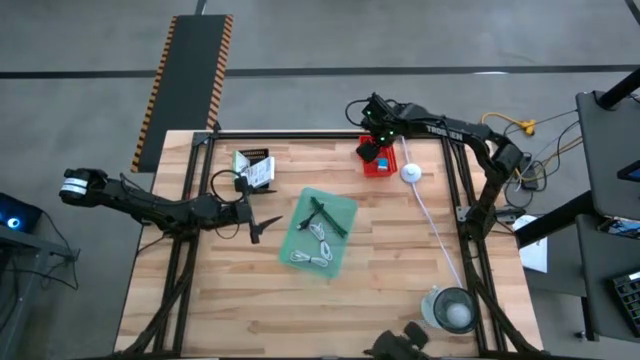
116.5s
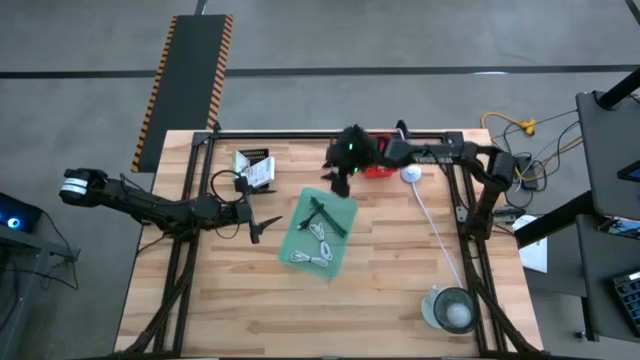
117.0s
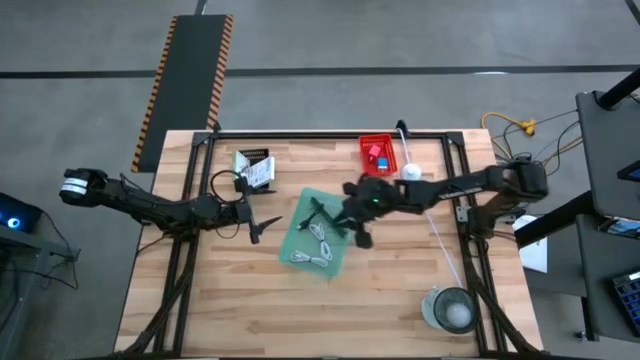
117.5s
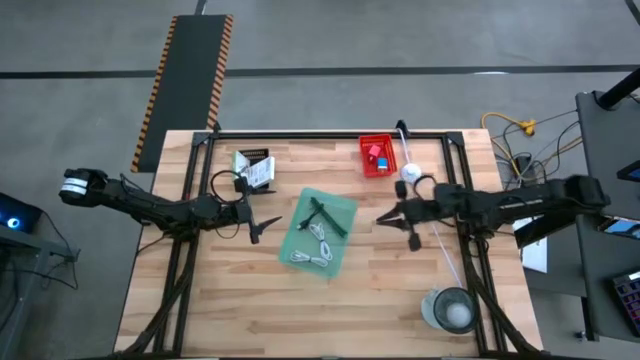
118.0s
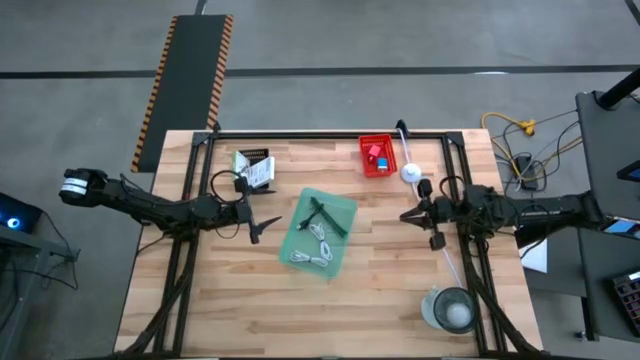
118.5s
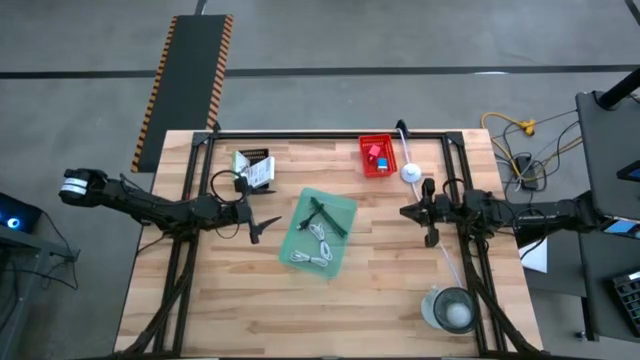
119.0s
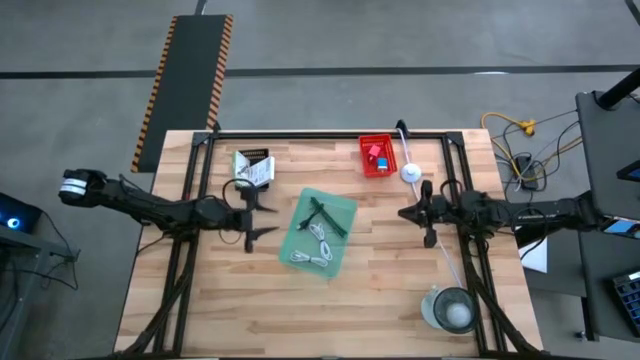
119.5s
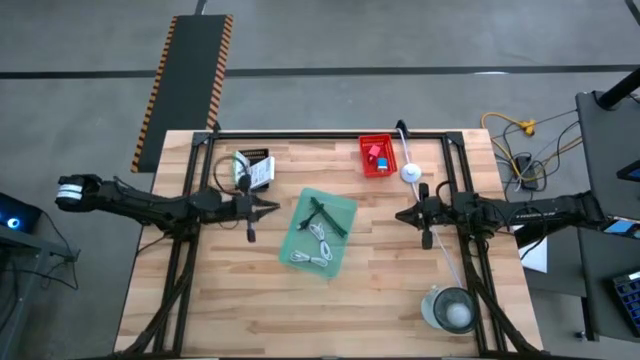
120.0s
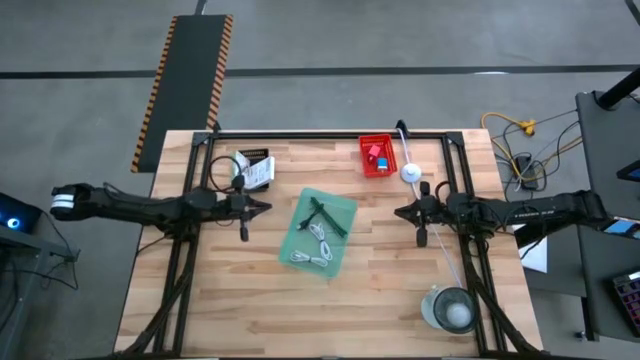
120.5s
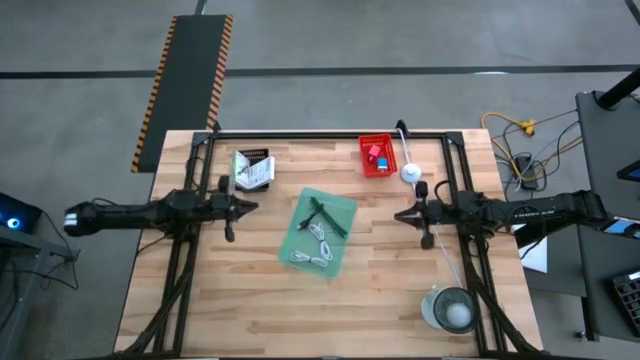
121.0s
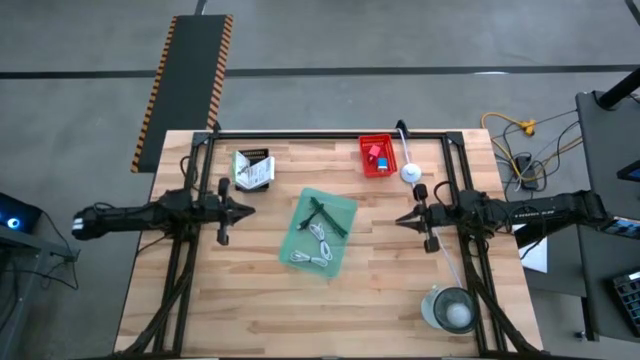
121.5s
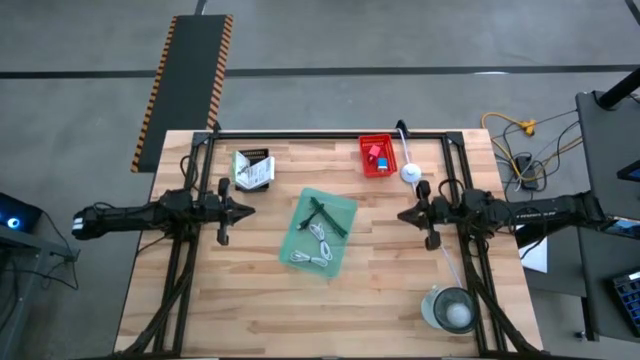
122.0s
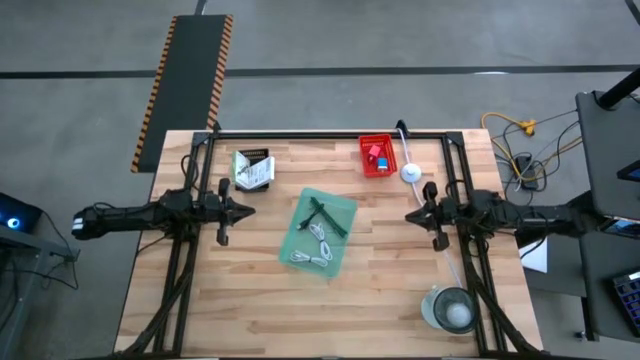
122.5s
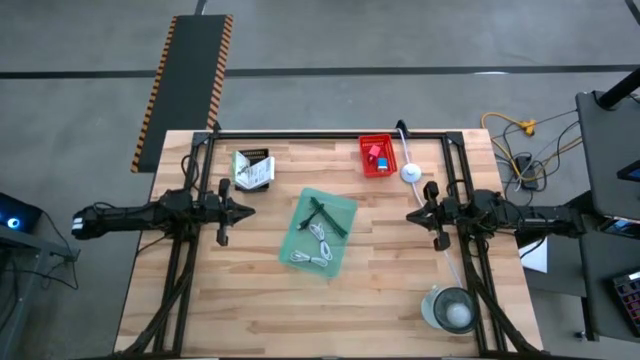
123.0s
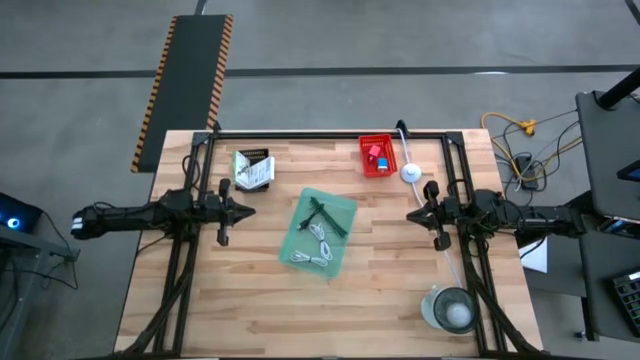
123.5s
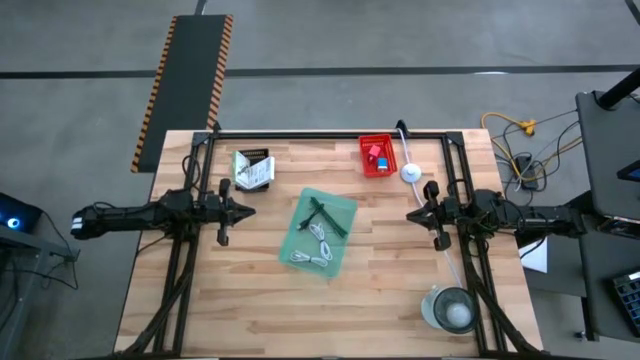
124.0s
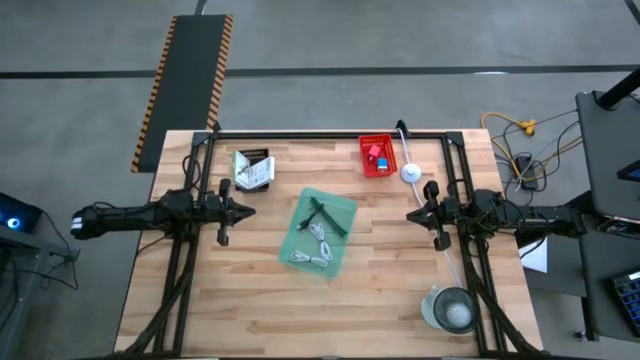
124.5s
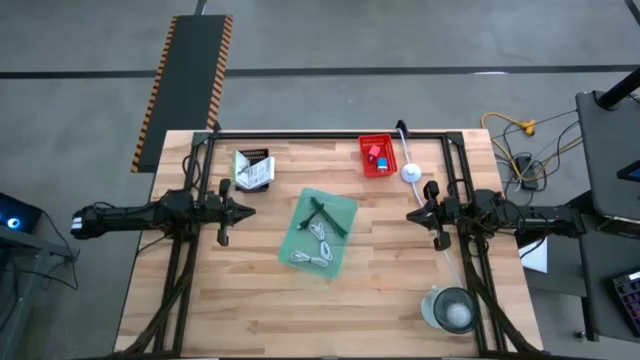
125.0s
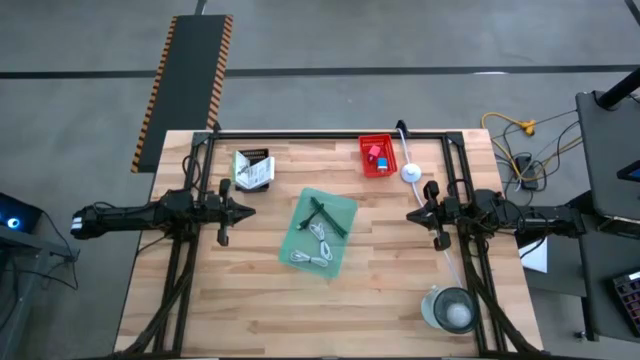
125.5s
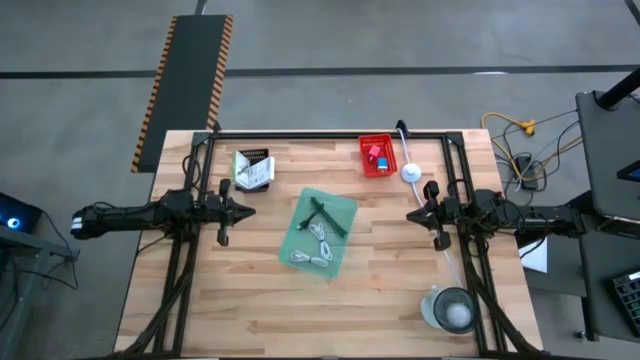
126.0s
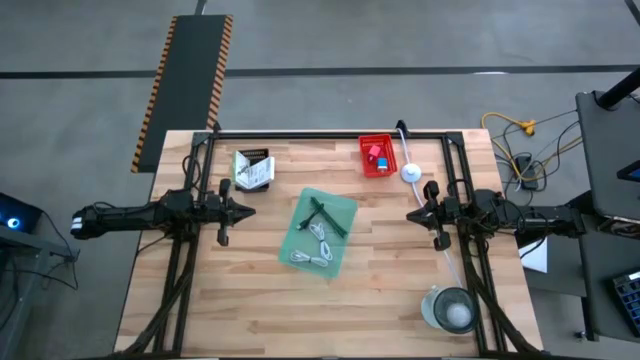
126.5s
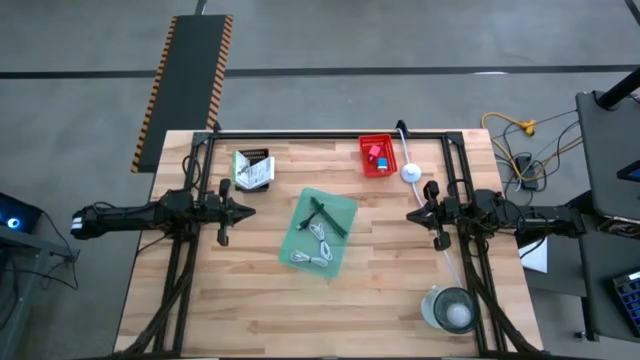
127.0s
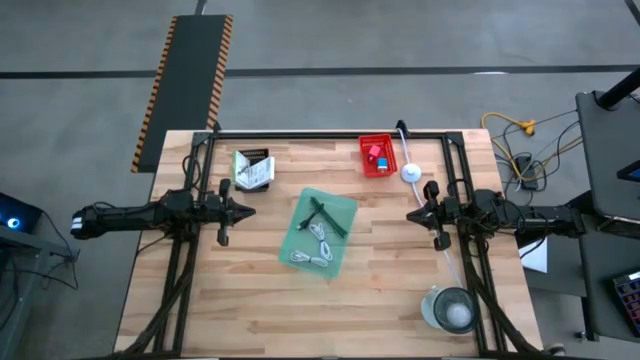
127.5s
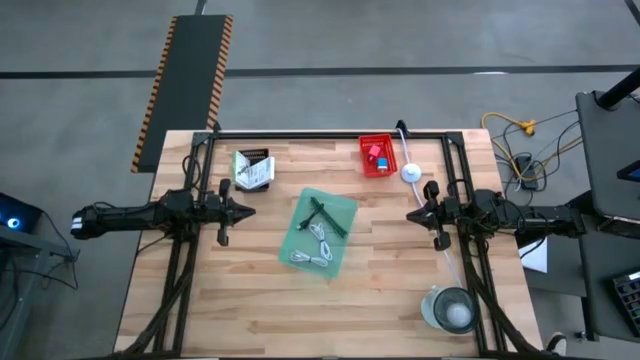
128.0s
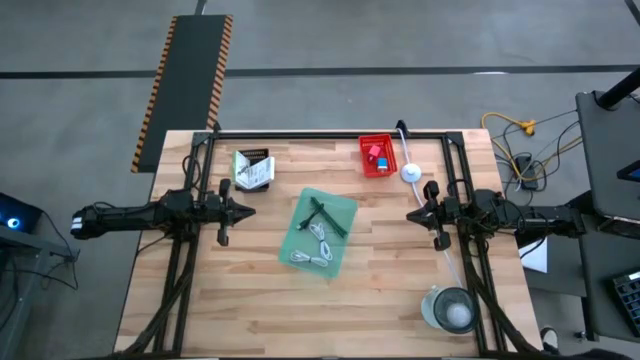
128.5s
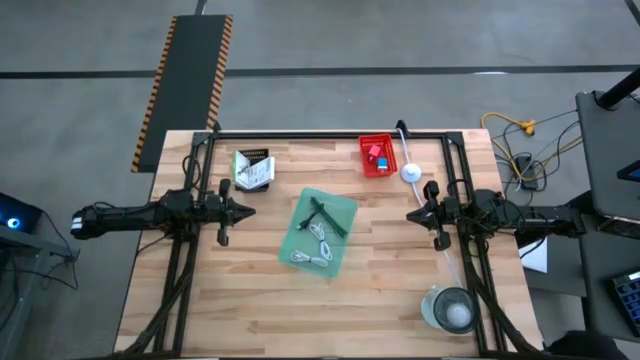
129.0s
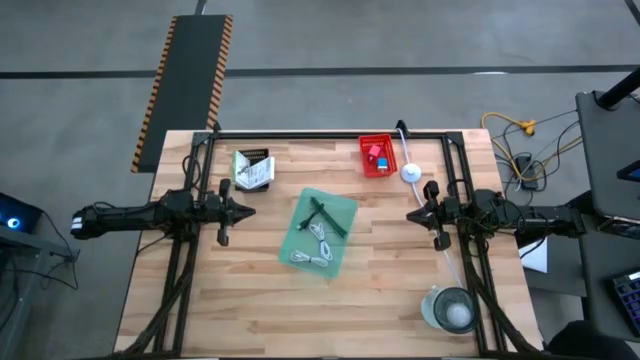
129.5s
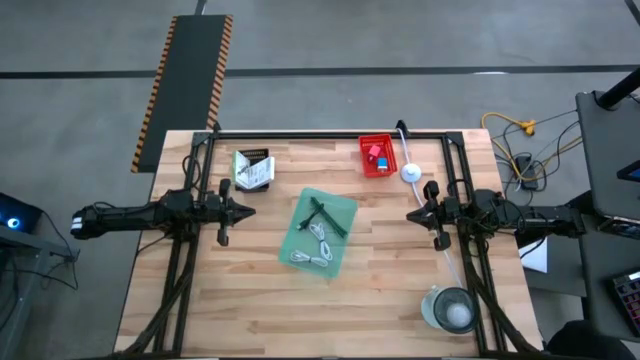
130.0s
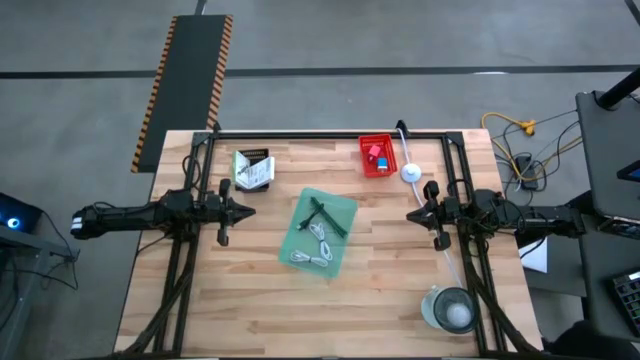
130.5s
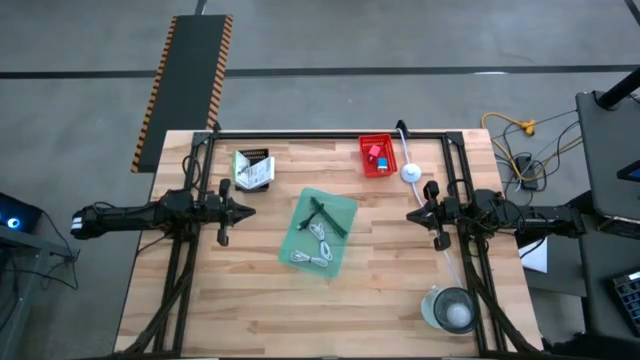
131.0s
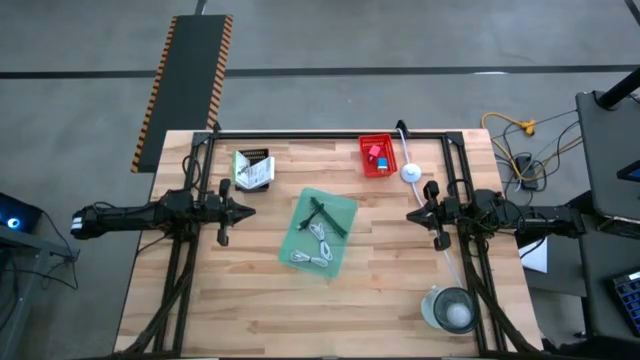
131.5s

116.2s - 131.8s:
Task: Pick and place items into bin
Return to Home Position

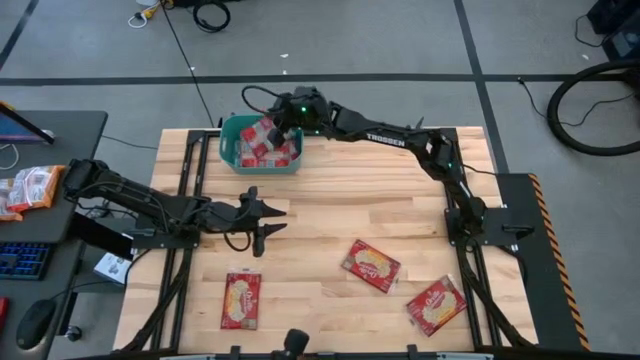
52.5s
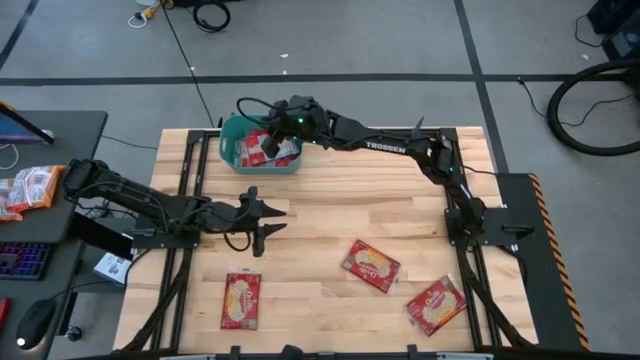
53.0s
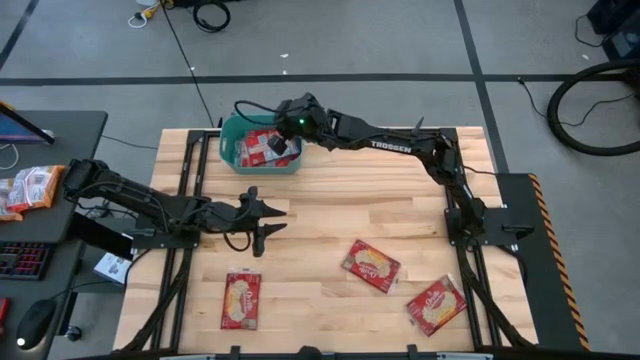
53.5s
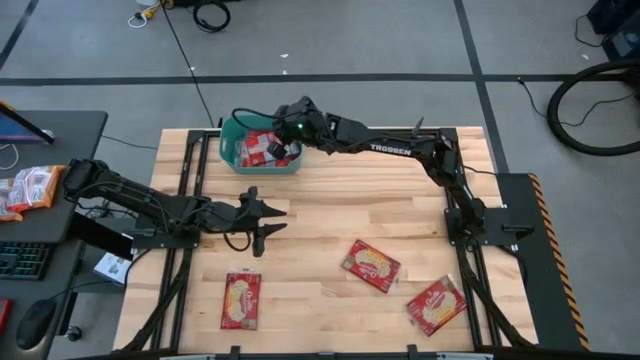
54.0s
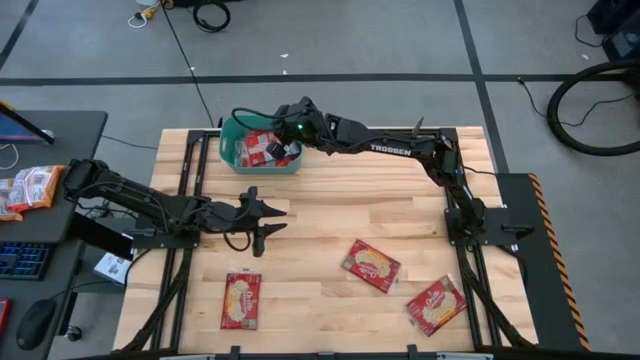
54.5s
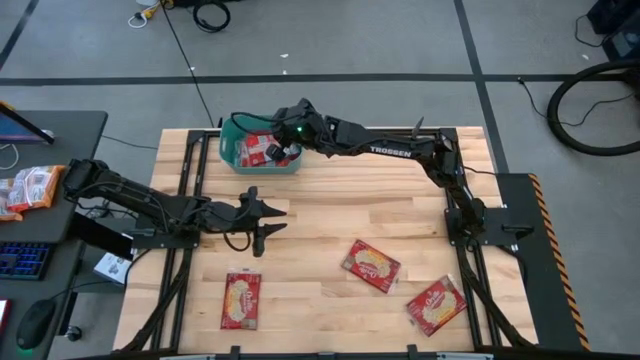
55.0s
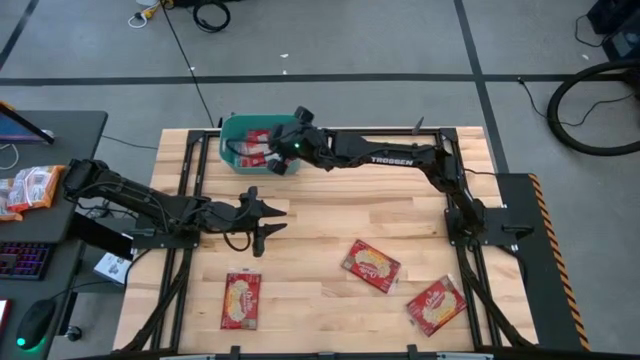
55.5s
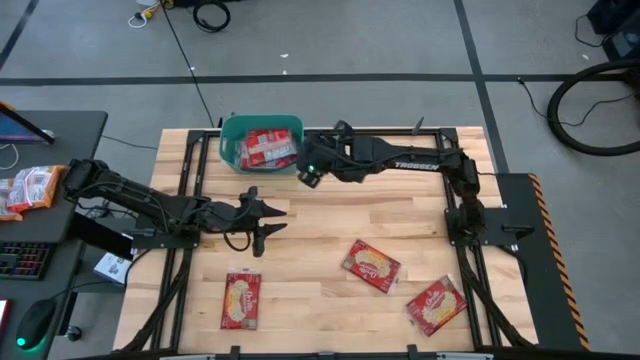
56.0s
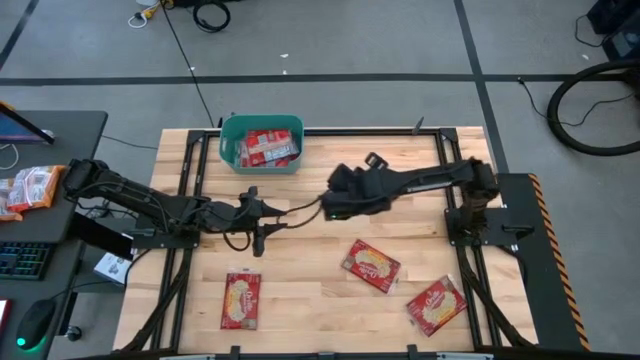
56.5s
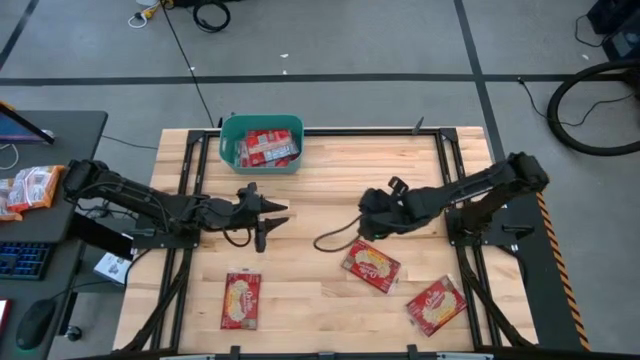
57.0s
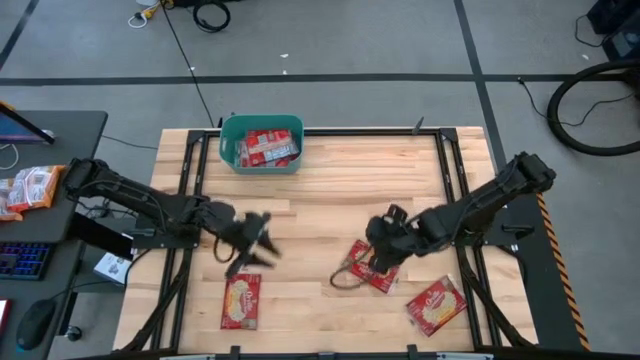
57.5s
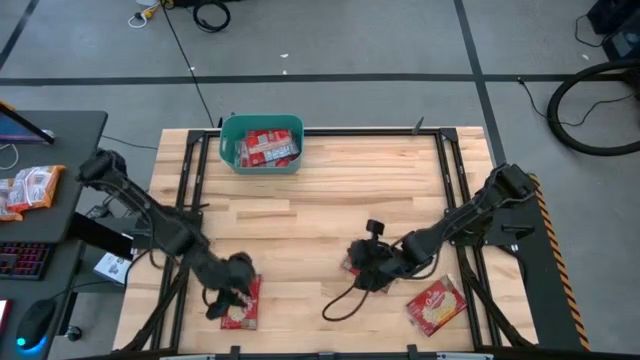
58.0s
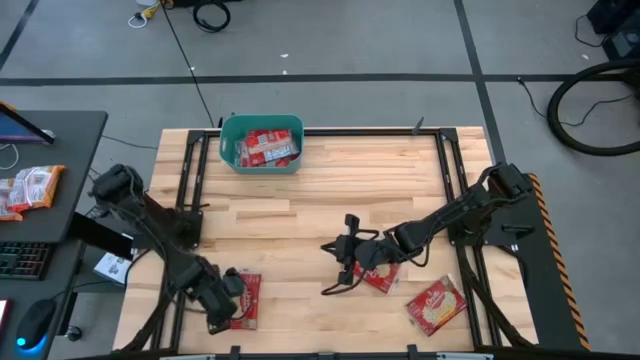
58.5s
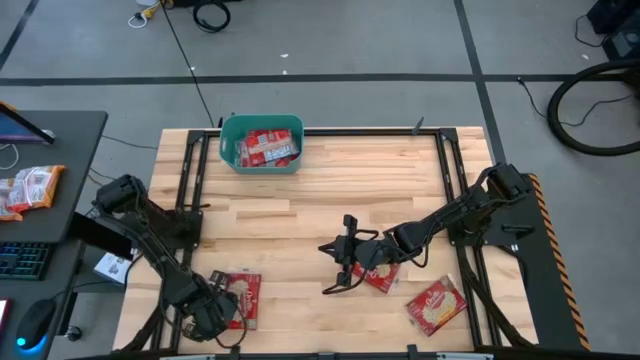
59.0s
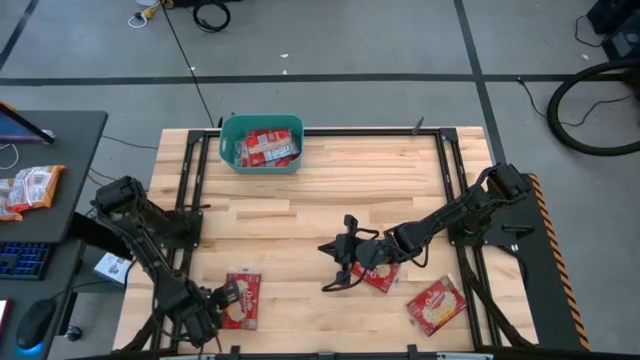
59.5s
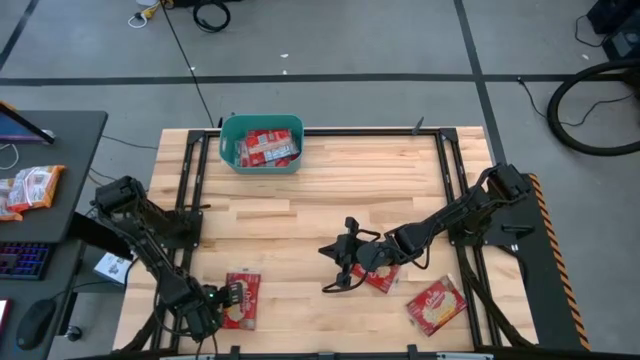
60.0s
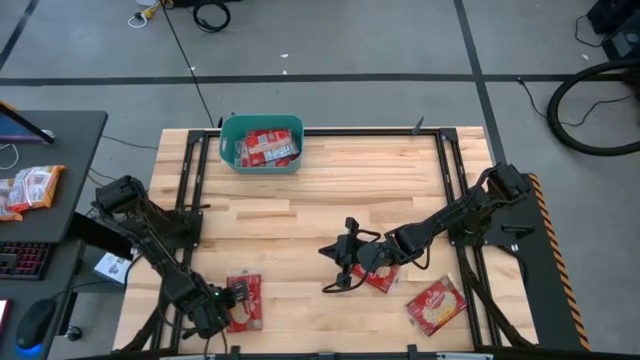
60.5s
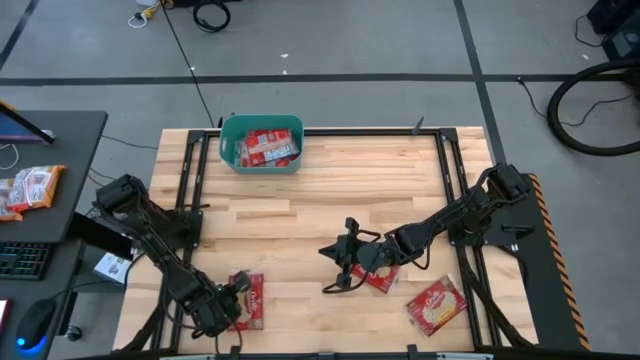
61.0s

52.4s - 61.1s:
Task: Sort popcorn bags into baskets
Put the left popcorn bag into the blue bin
